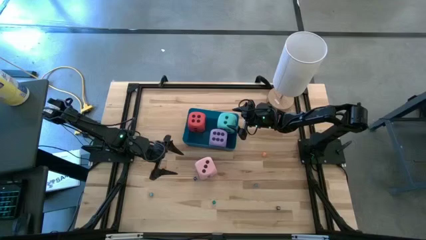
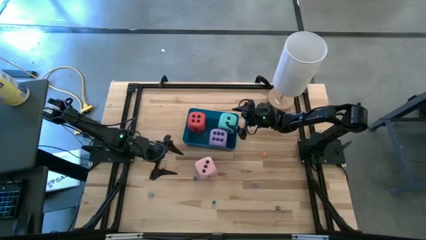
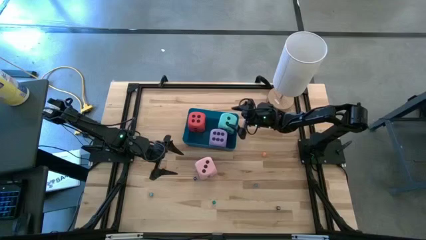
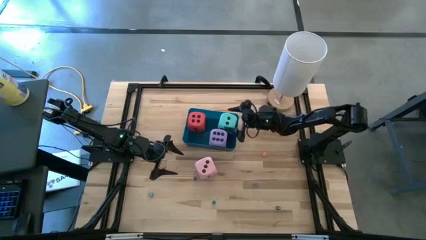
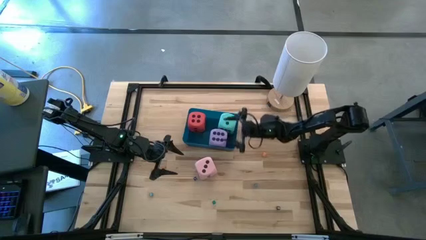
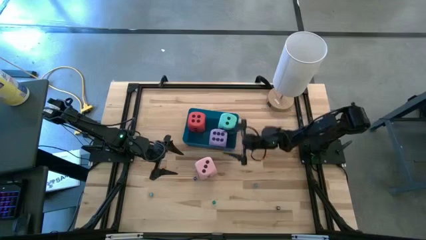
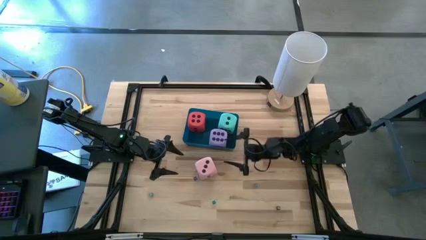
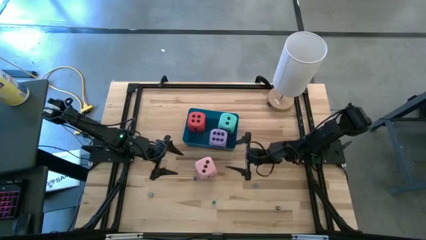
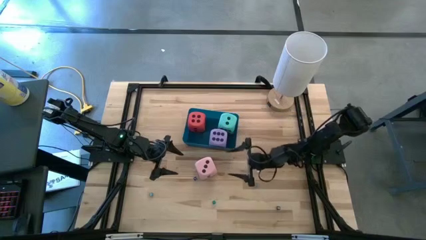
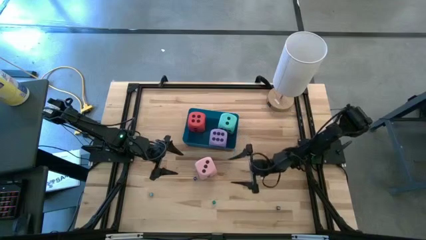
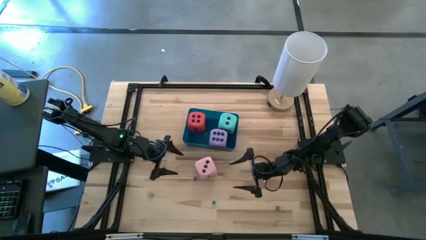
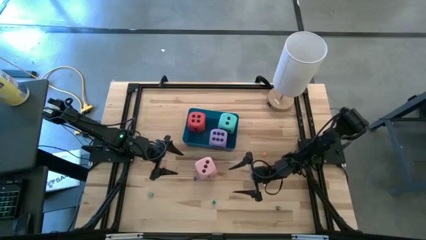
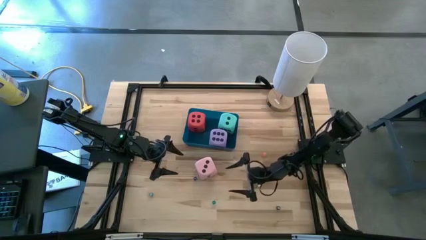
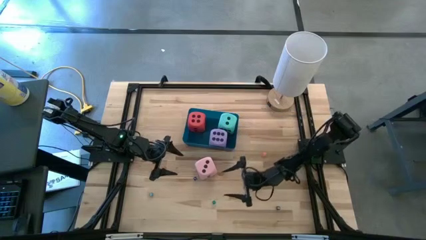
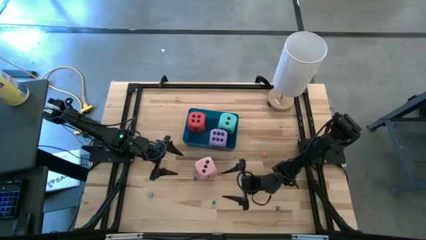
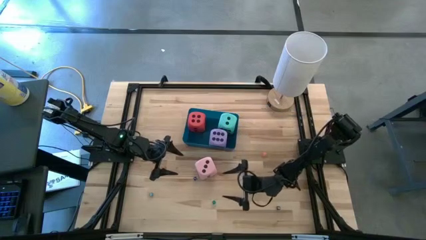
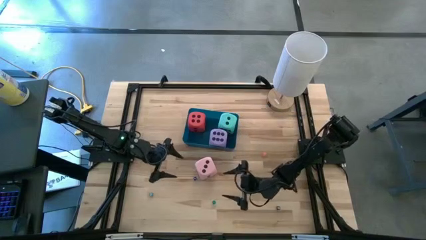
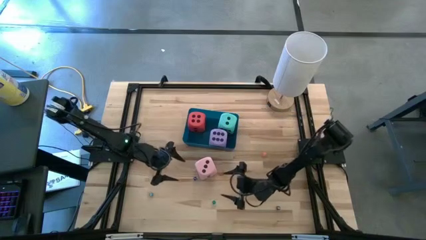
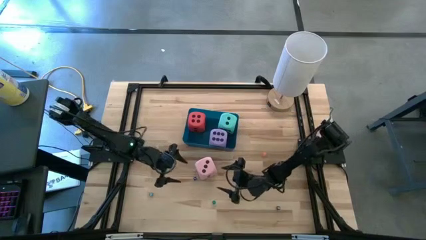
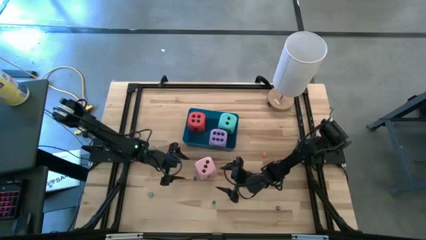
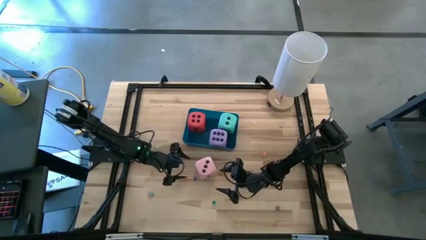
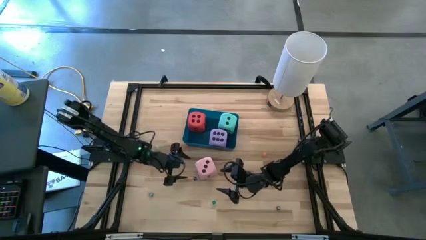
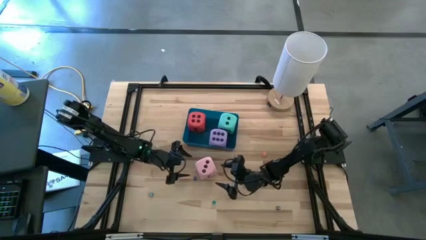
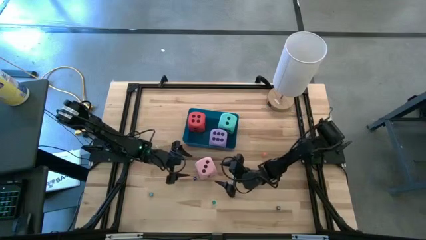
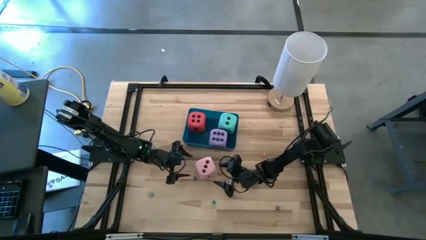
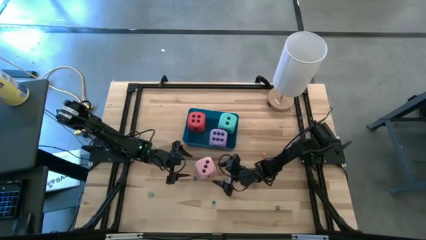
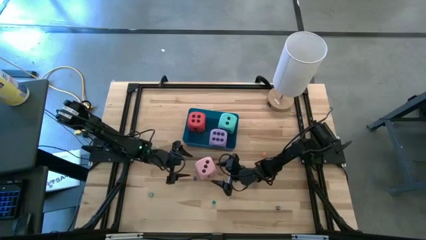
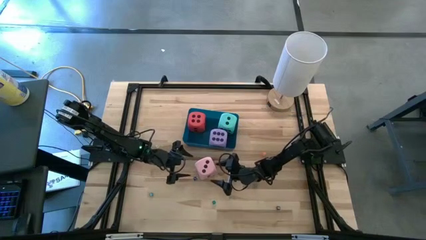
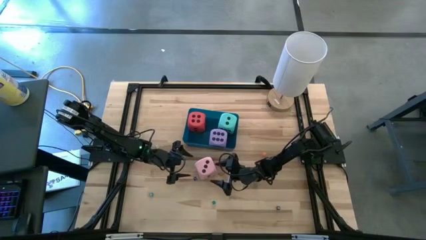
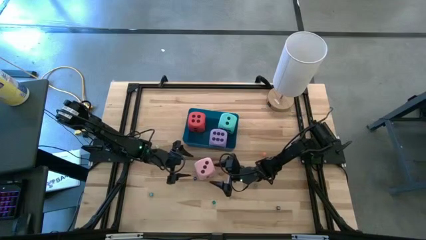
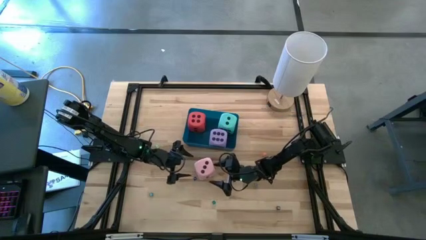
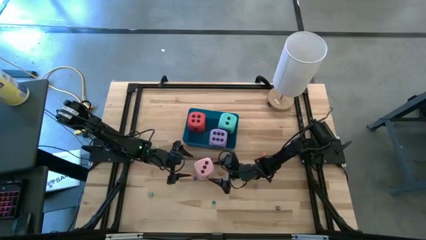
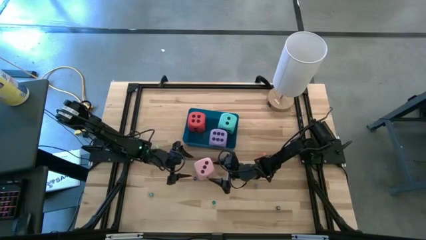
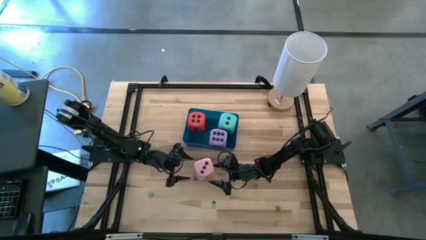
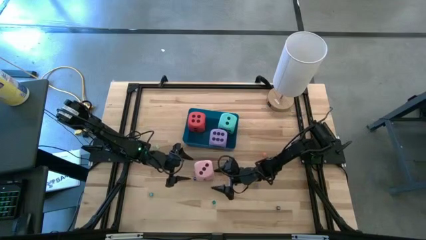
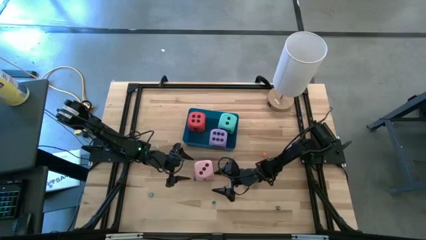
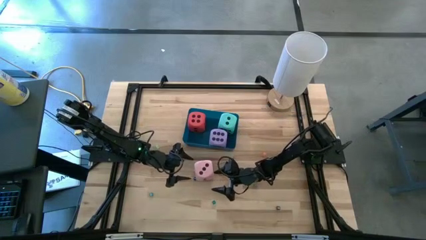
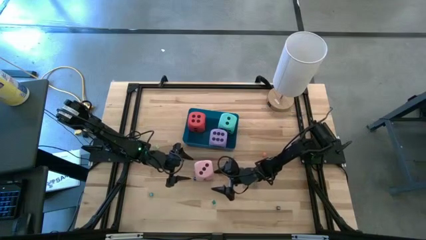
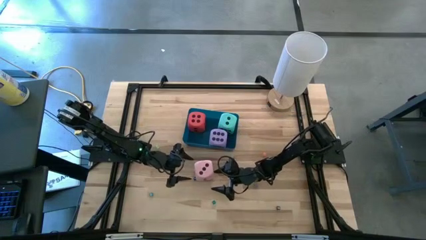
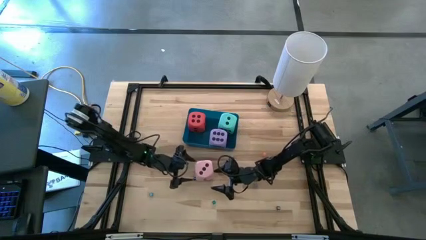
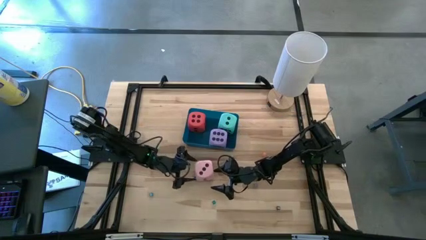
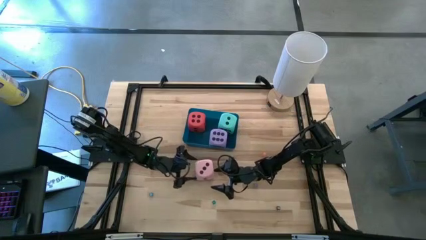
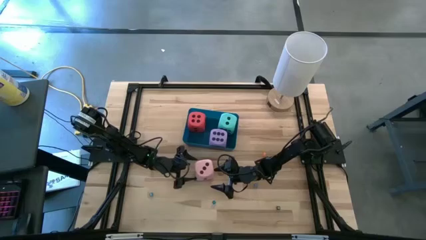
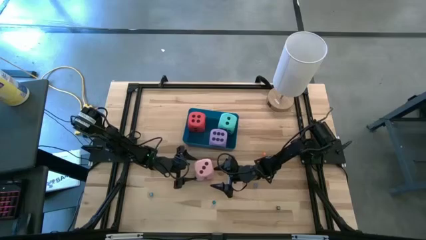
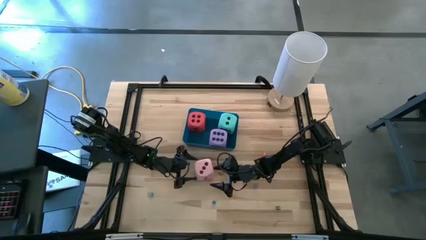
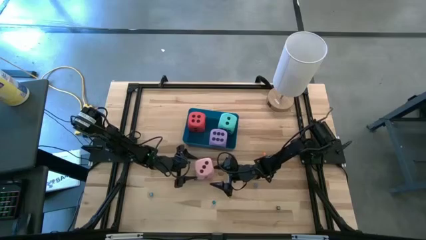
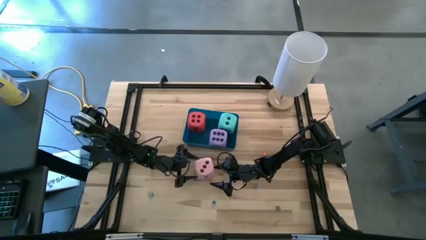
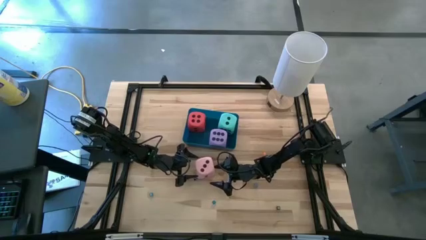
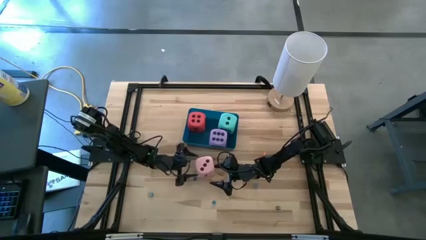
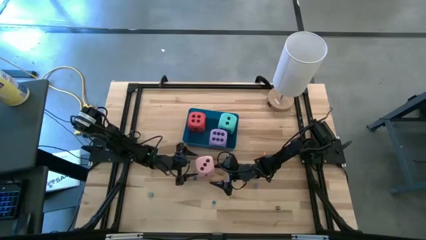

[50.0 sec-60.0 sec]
Task: Pick & Place Dice
Put the pink die into the blue bin
